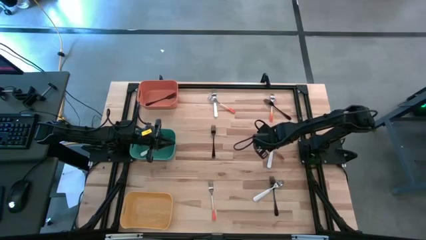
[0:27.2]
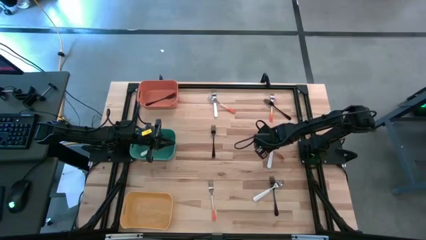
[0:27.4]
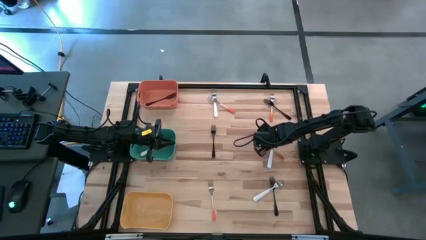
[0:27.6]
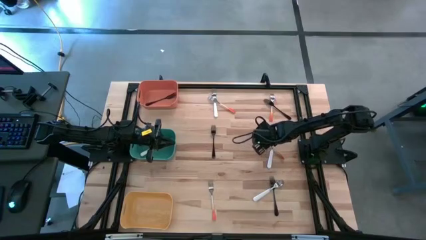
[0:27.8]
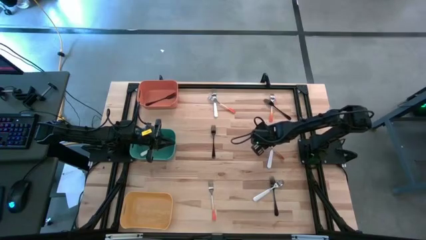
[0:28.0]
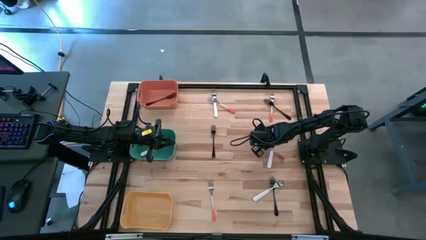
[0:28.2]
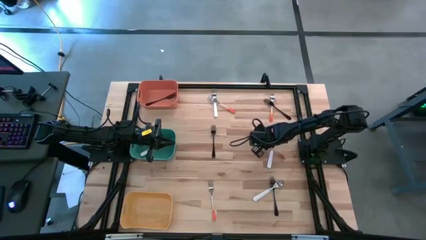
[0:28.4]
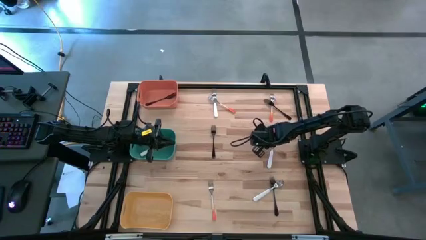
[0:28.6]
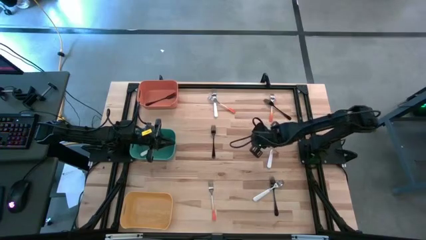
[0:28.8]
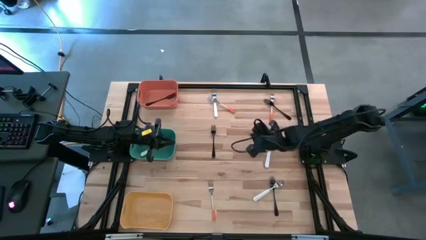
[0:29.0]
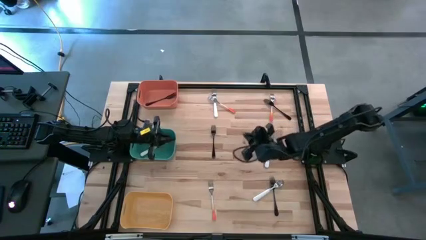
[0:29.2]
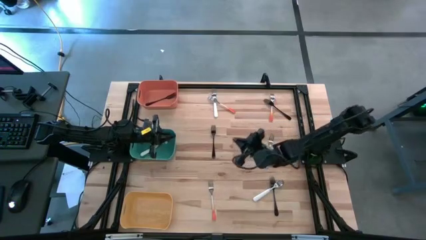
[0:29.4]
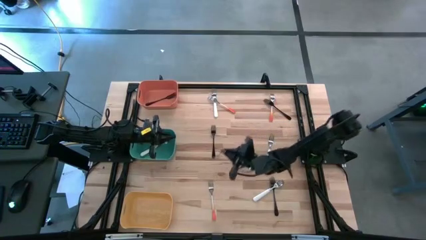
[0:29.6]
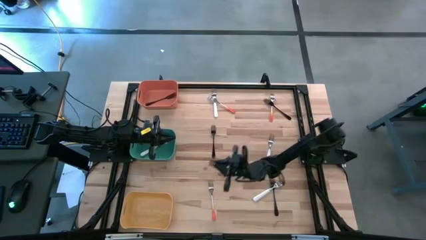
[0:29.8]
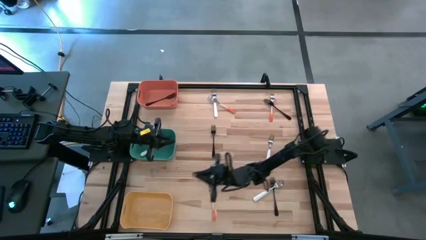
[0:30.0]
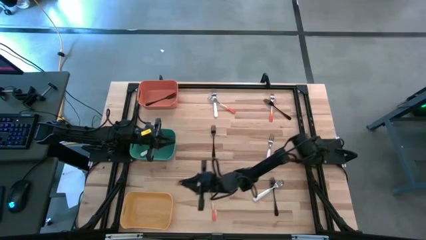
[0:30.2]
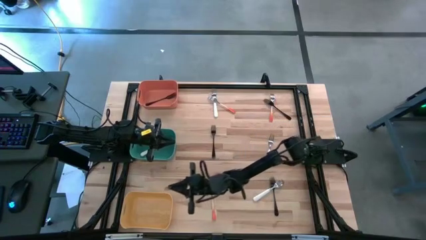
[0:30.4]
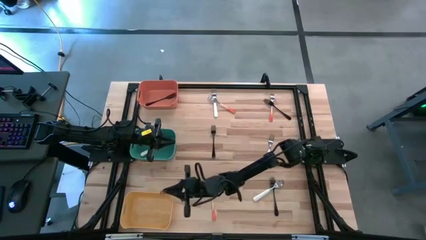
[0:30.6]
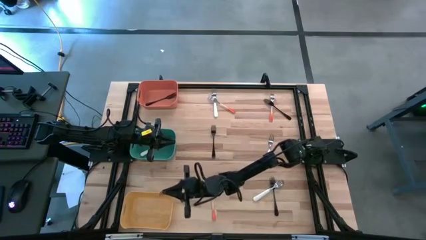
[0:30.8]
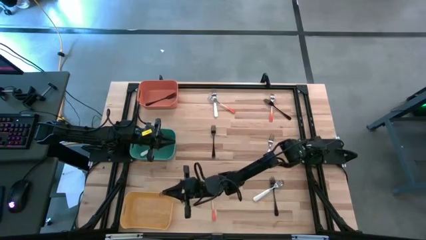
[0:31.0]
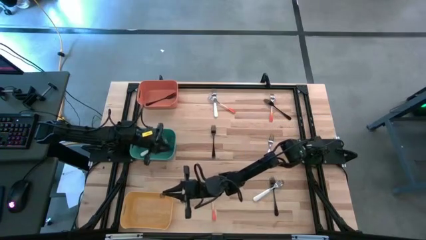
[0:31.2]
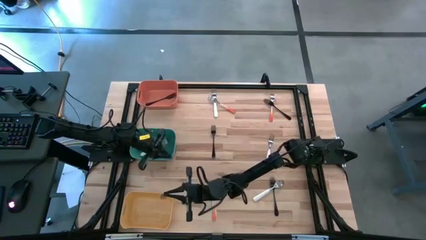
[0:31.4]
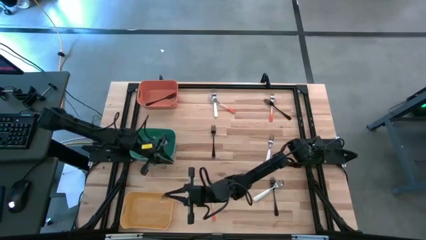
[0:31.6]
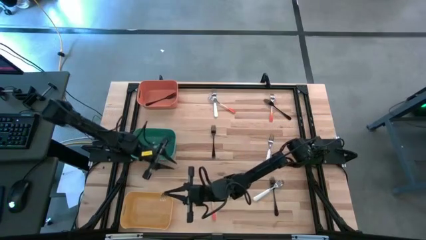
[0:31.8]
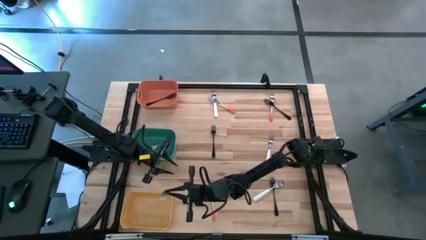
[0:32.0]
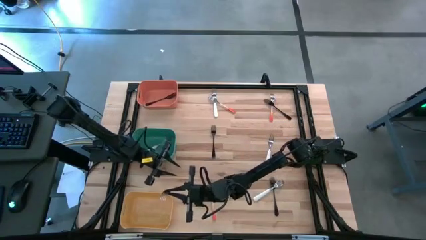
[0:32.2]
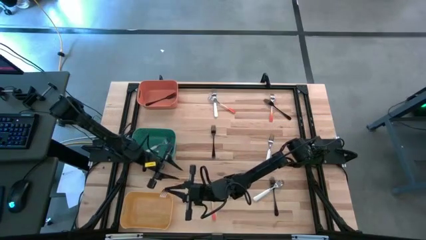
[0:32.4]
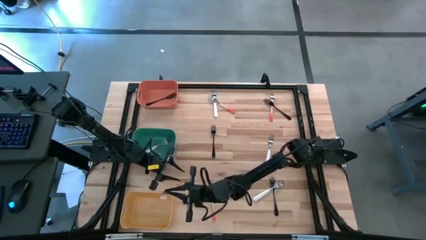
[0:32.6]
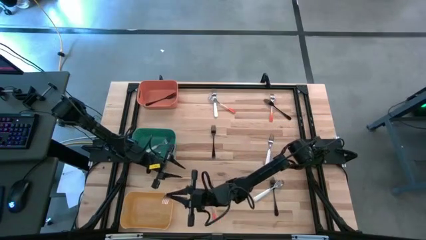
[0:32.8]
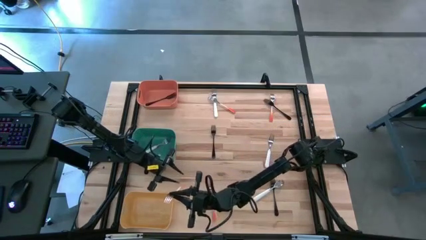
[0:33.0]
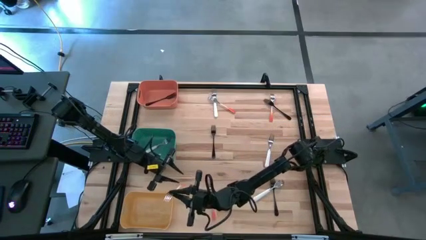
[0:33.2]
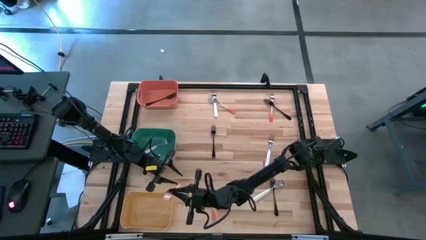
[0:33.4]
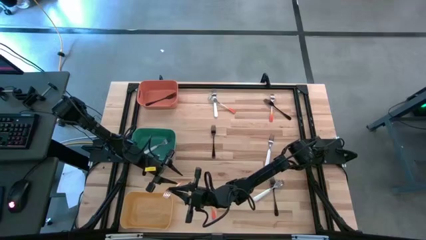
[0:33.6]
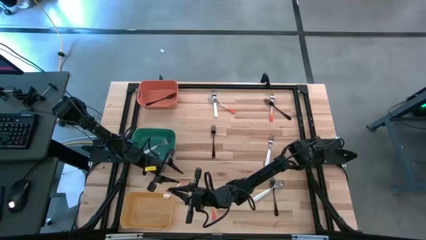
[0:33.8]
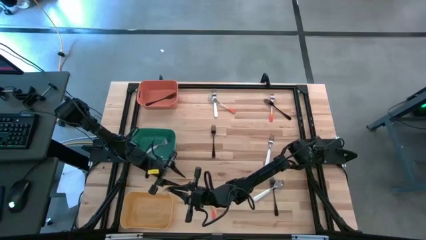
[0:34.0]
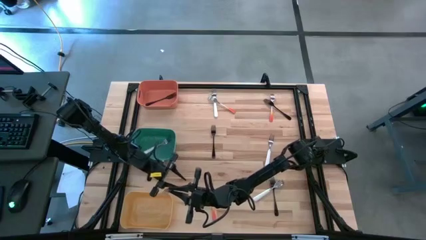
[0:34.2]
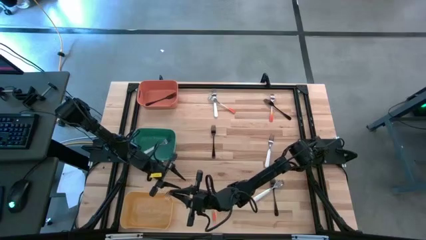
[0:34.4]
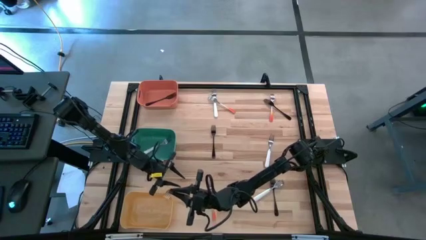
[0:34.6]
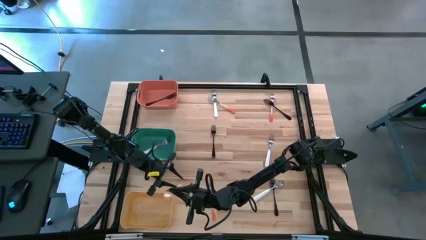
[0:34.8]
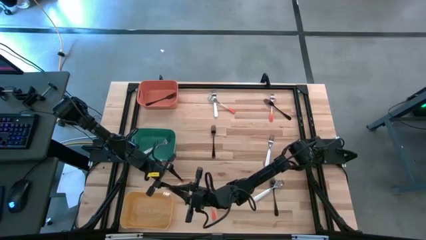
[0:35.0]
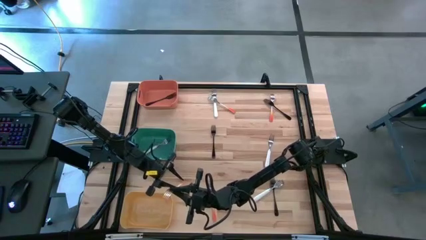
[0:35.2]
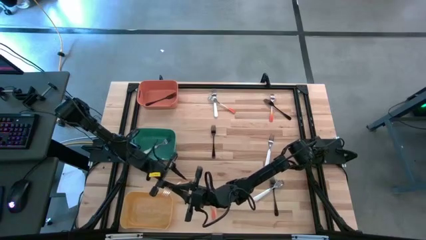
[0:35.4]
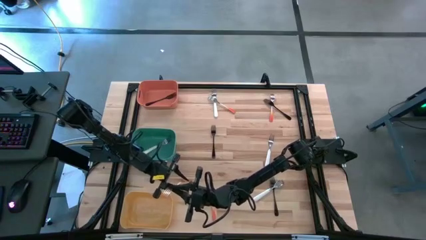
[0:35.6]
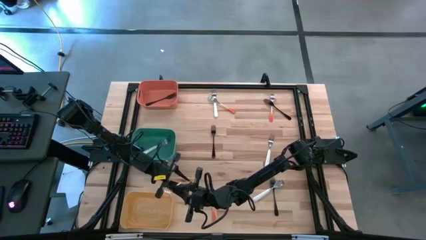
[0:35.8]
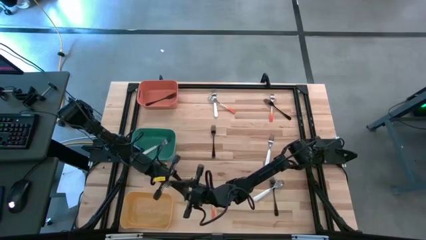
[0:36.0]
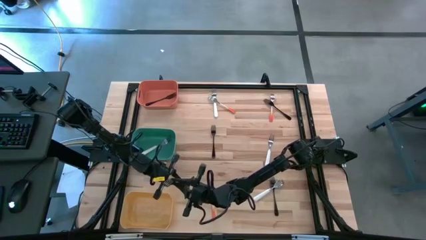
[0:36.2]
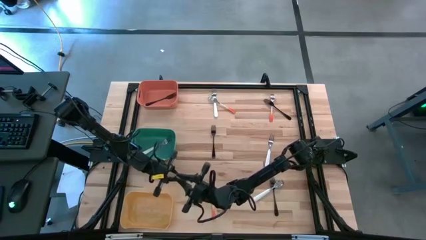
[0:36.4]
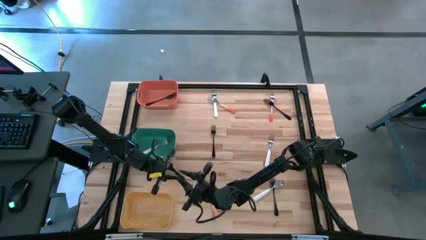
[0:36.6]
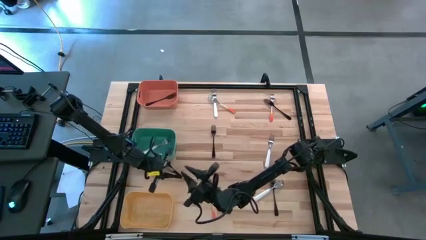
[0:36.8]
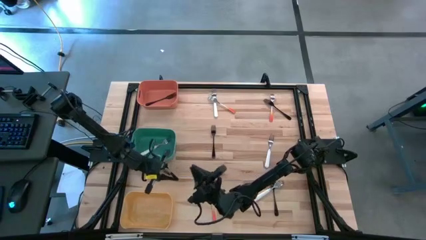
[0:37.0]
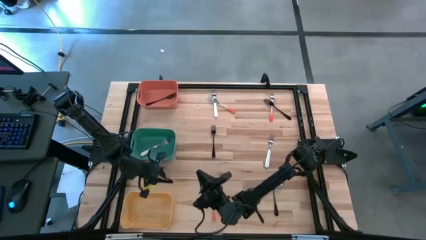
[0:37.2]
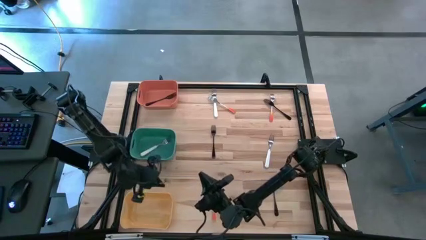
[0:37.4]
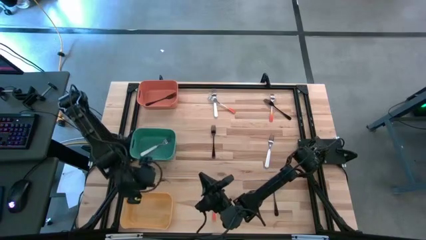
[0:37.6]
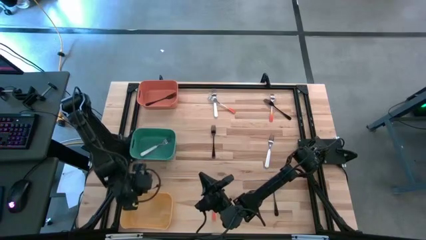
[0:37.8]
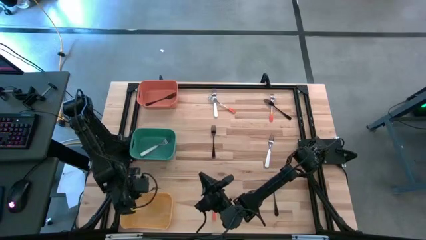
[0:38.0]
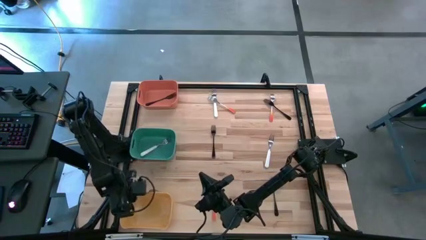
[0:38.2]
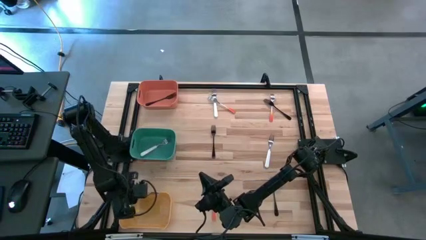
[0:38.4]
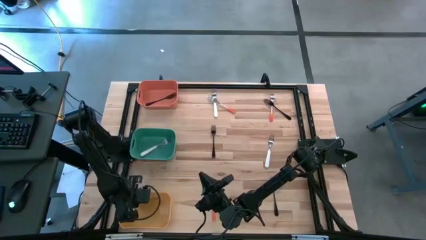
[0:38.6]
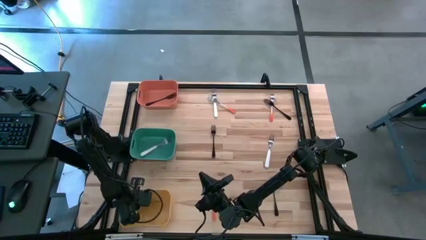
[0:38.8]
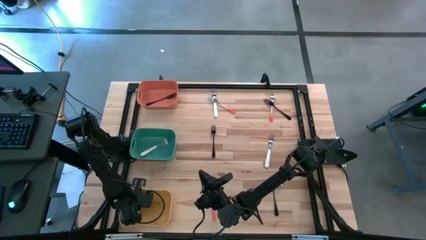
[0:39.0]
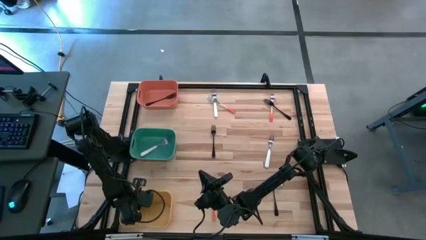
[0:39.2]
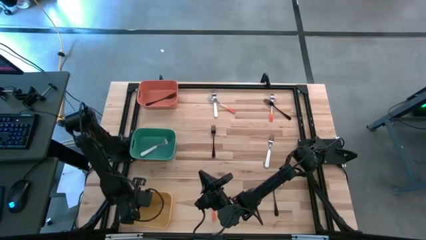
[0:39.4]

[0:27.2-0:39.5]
Task: Sort silverware by color (type)
Put the orange fork into the yellow bin
